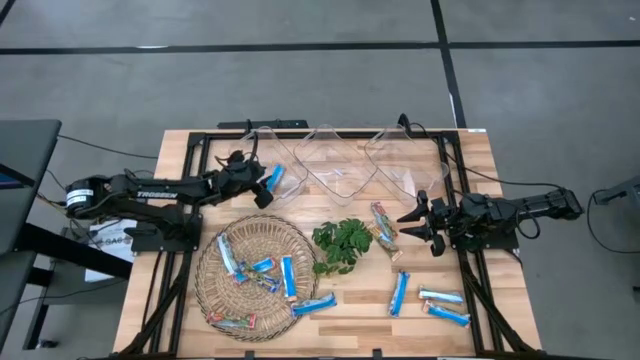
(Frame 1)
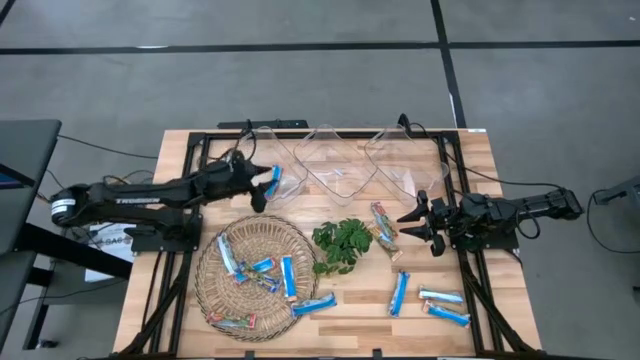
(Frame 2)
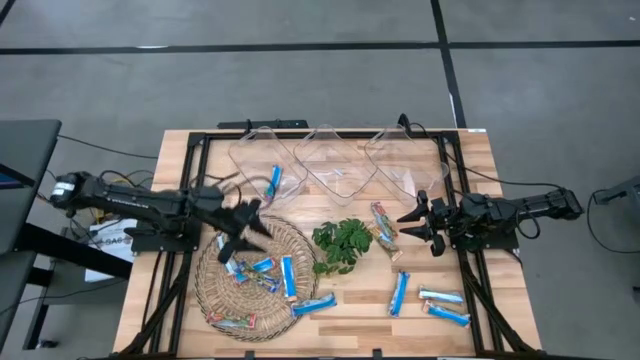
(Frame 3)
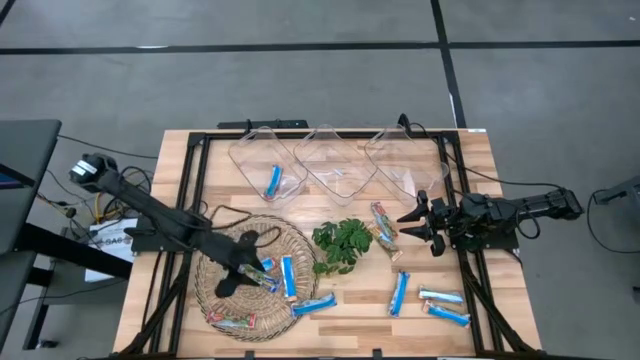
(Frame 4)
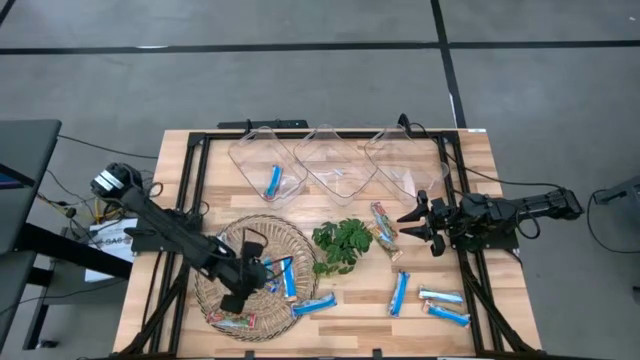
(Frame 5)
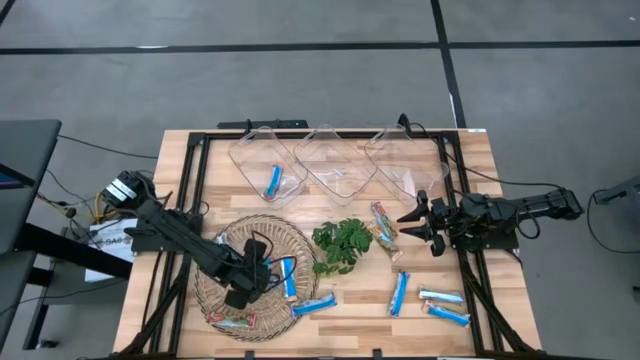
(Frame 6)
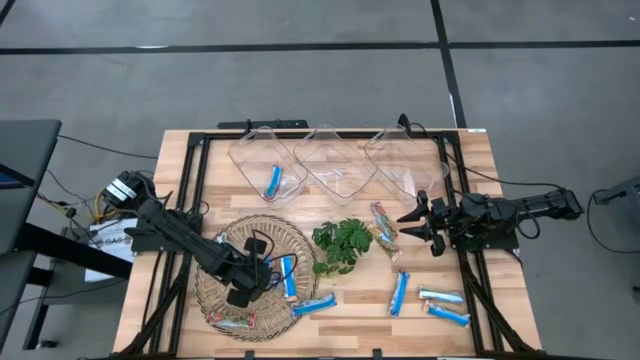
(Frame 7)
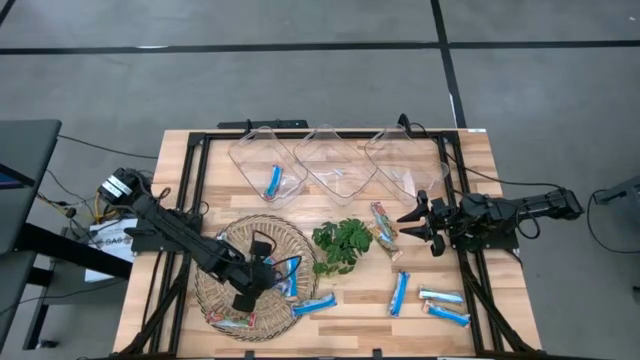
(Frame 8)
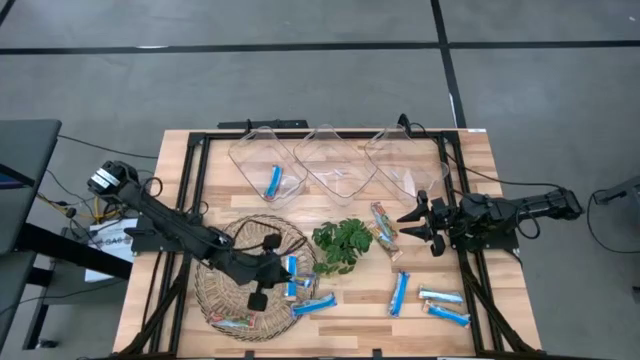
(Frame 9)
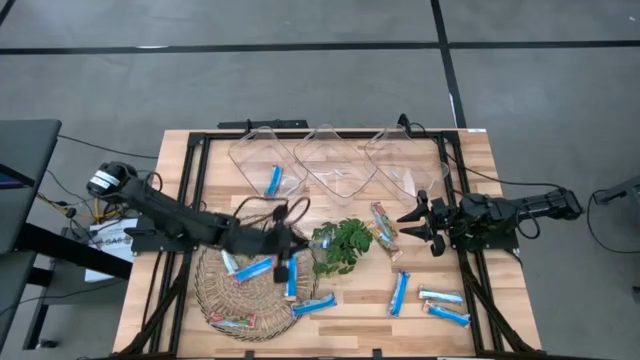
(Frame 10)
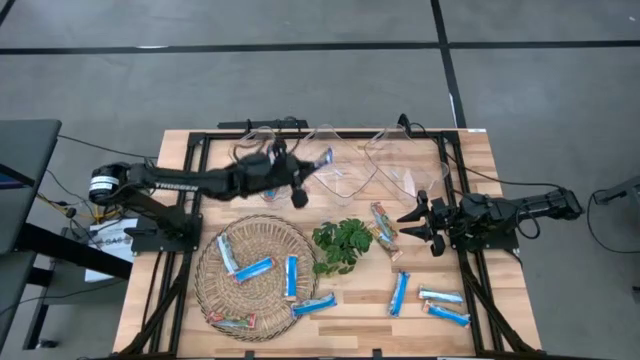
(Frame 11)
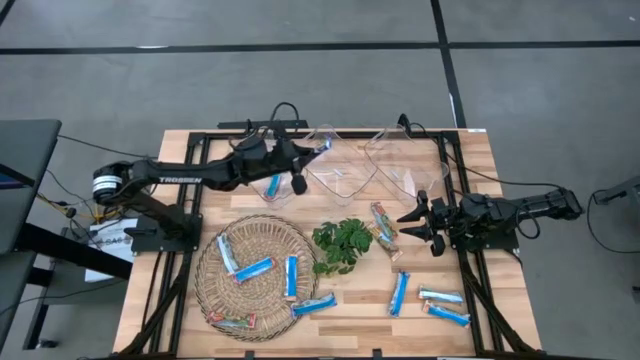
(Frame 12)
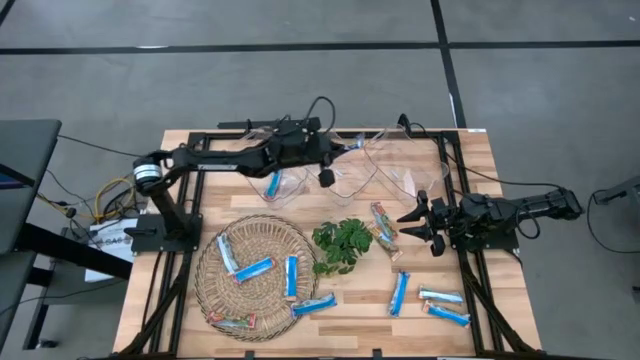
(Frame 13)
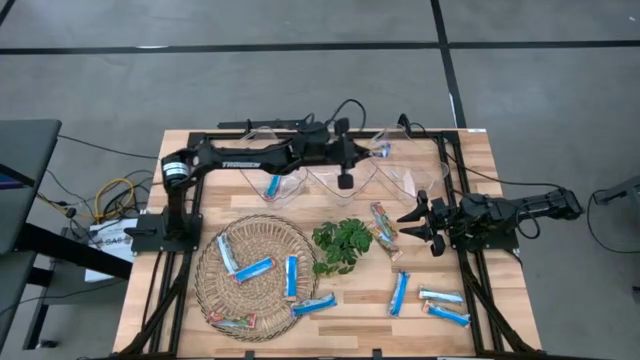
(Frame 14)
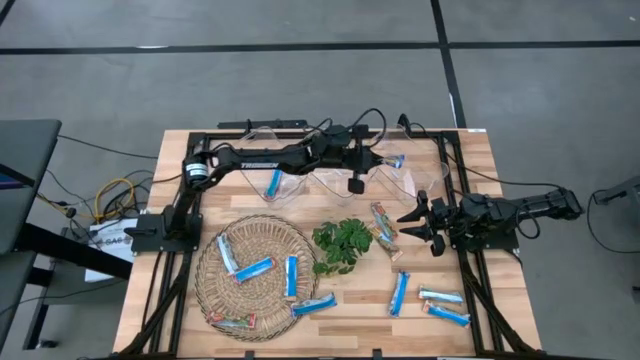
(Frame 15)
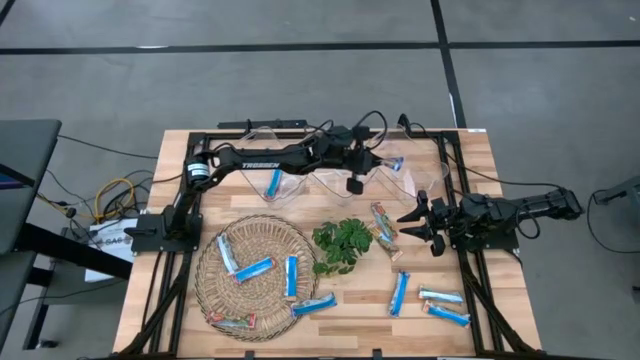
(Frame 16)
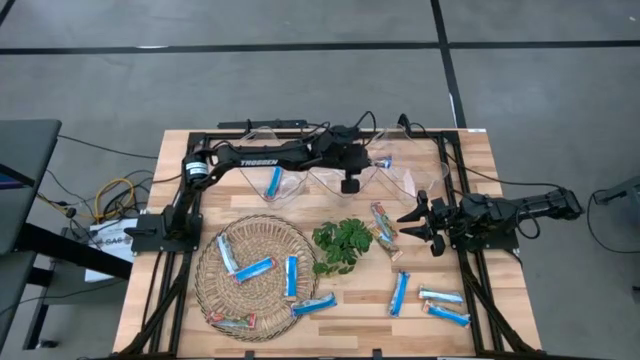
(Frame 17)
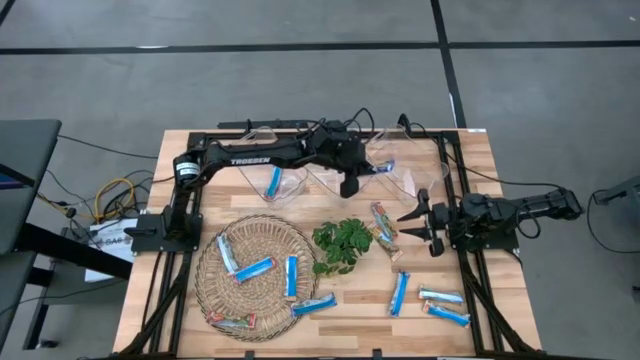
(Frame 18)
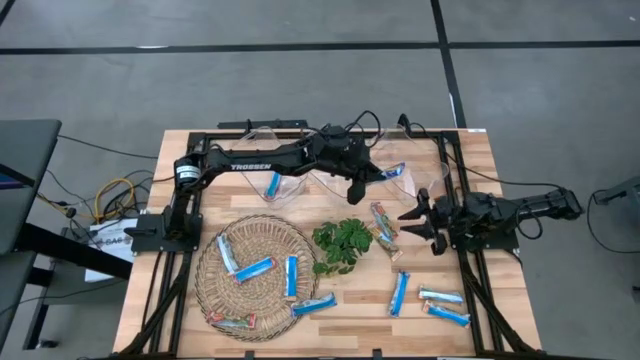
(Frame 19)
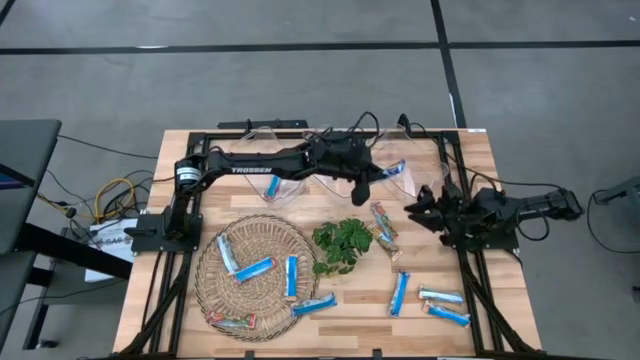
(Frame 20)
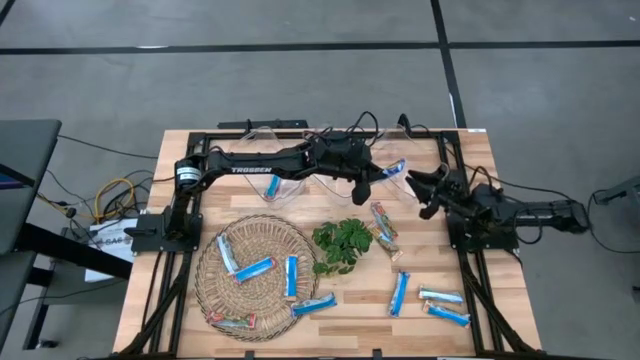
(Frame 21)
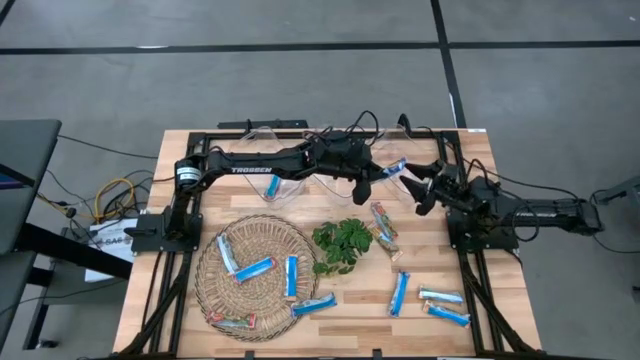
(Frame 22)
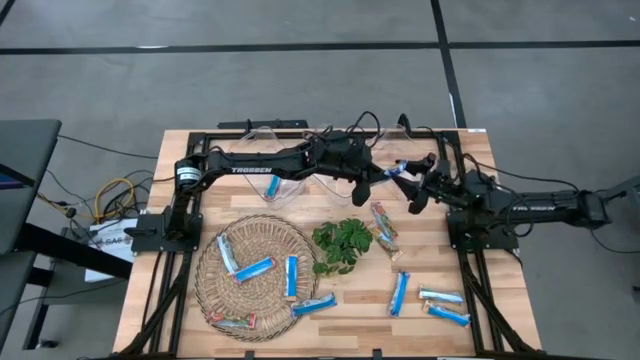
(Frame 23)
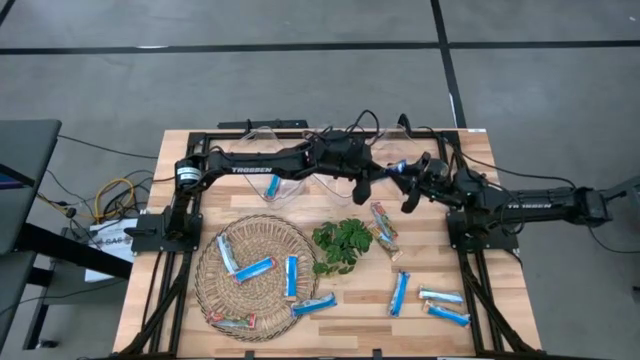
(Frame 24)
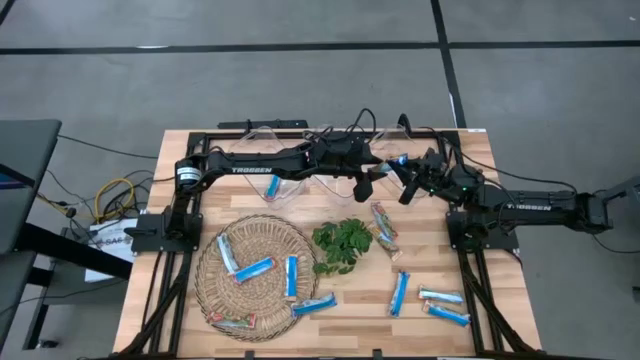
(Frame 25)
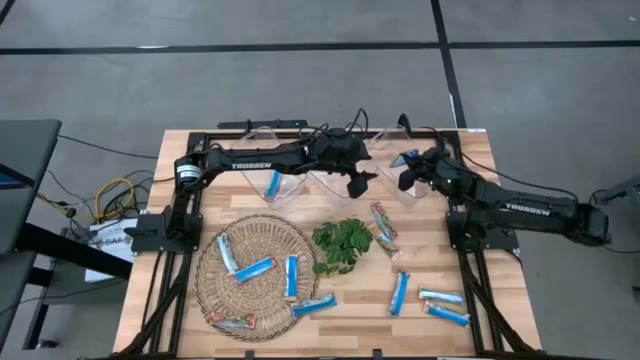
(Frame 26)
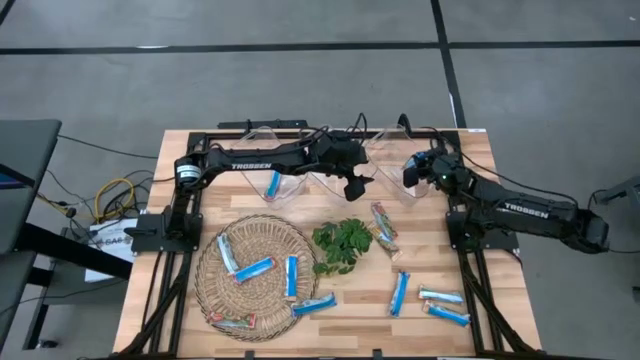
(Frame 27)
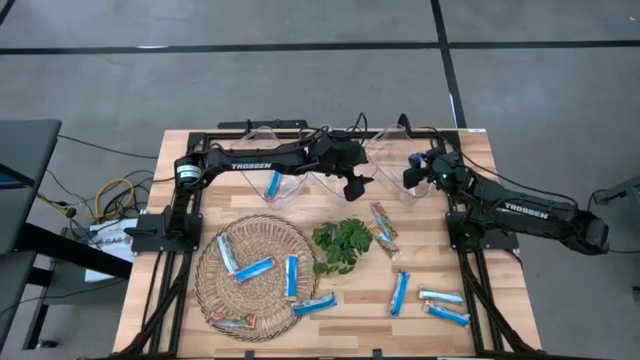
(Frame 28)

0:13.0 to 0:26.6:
Task: Pick and place Granola Bars by type
Put the blue granola bar into the right transparent bin

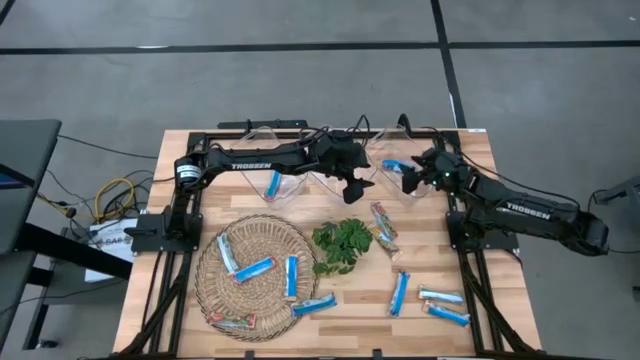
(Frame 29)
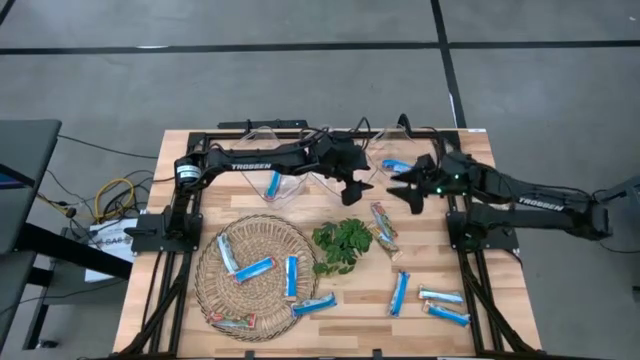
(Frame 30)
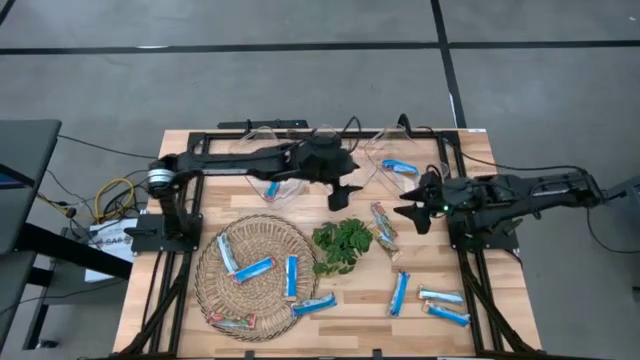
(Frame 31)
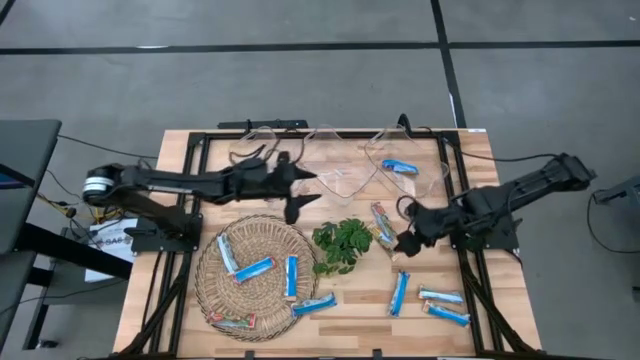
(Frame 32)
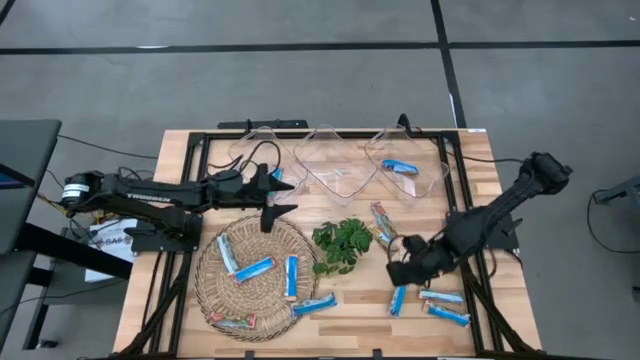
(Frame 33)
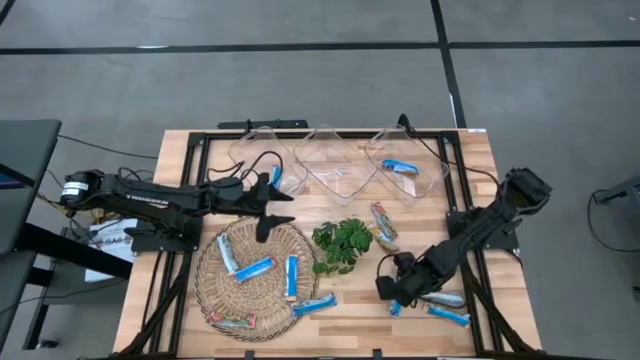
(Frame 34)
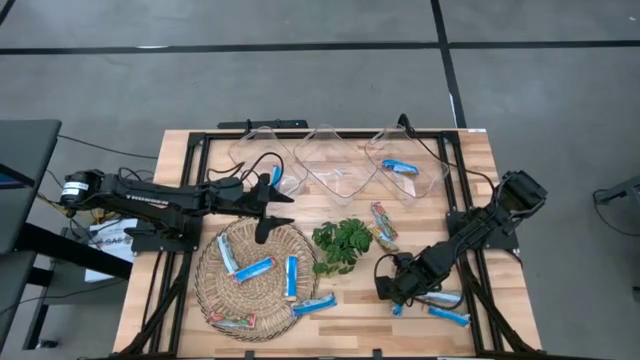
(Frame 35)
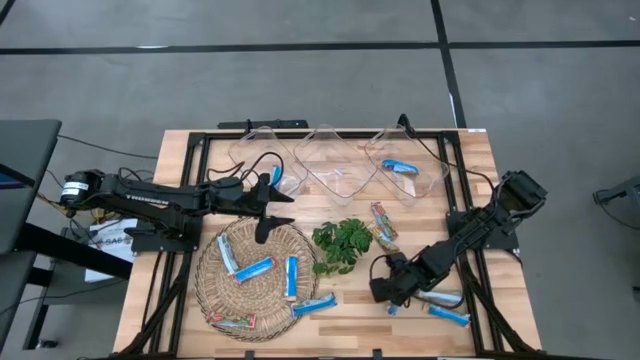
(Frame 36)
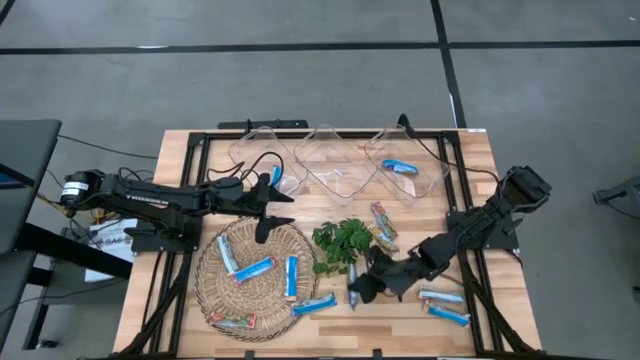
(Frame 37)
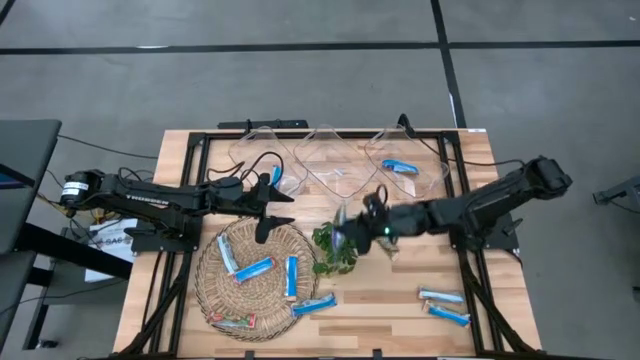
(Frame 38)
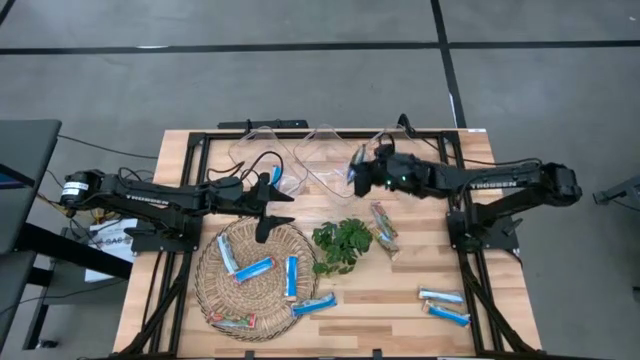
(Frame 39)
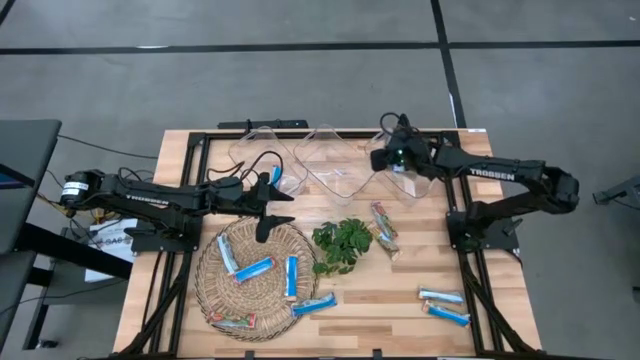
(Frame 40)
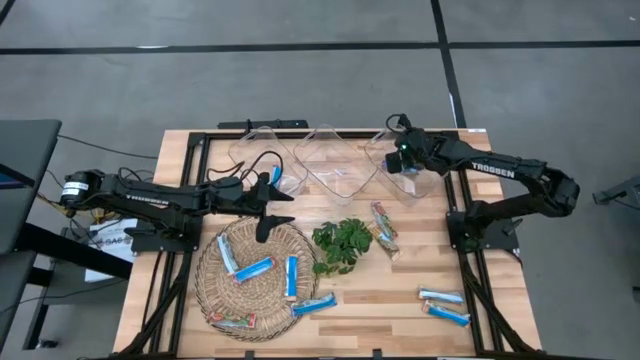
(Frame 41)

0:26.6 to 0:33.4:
Put the blue granola bar into the right transparent bin

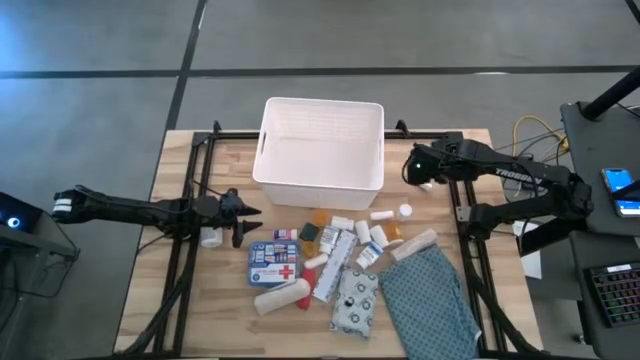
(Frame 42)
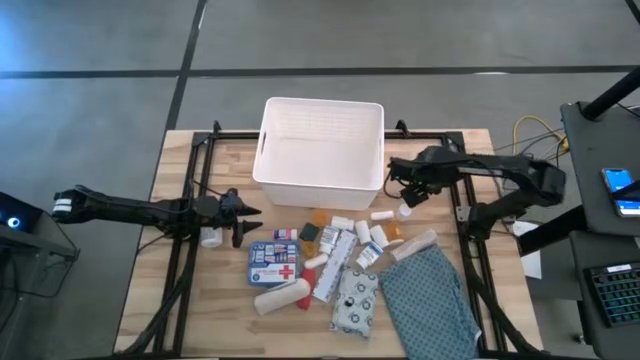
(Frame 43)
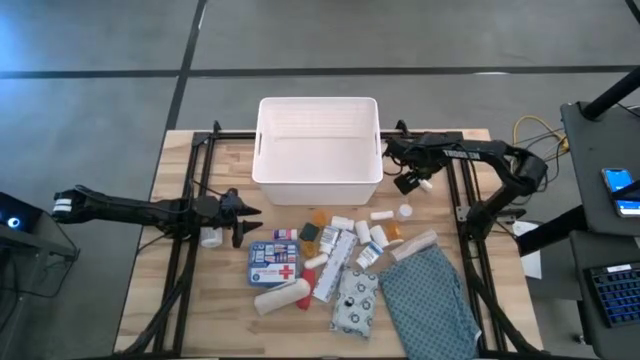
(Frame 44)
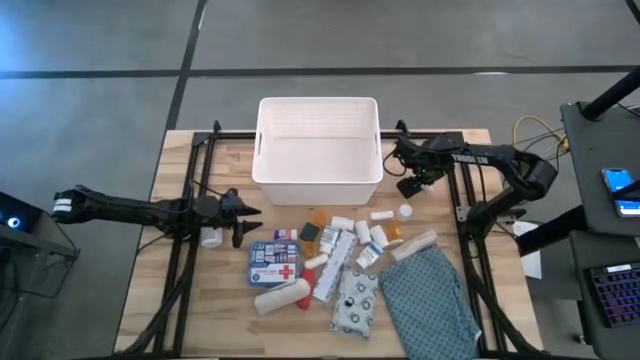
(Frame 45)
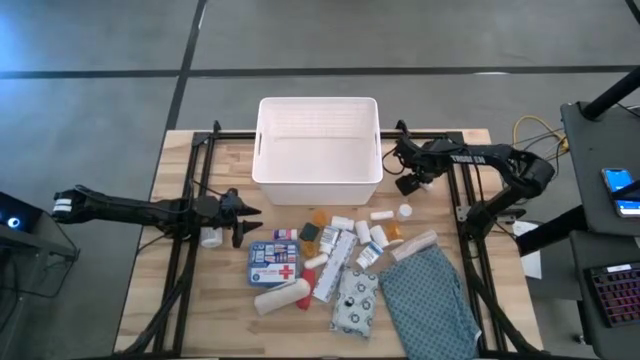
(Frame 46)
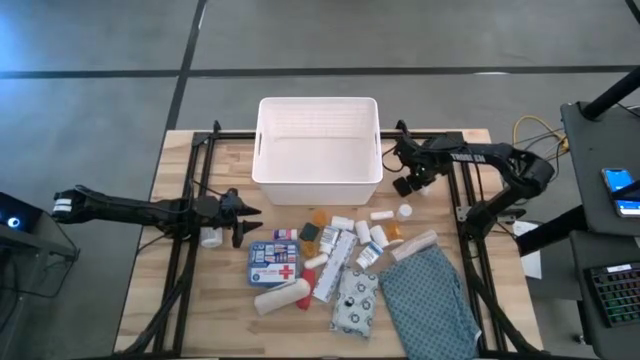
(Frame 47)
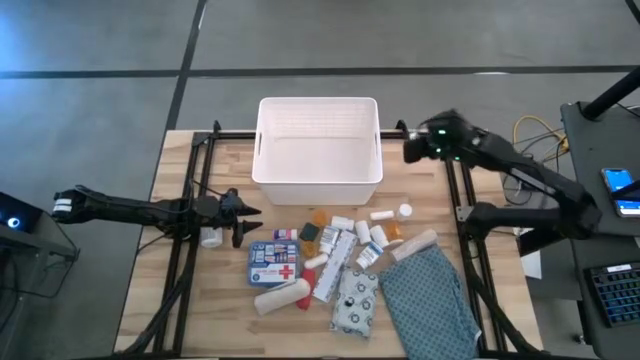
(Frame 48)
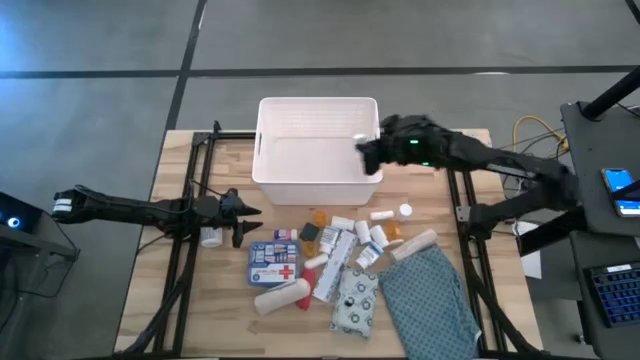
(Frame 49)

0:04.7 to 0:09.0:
Task: Pick & place medical supplies in basket/bin
Put the white gauze into the white bin
